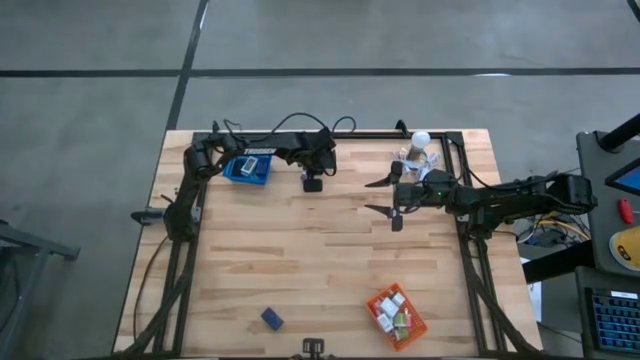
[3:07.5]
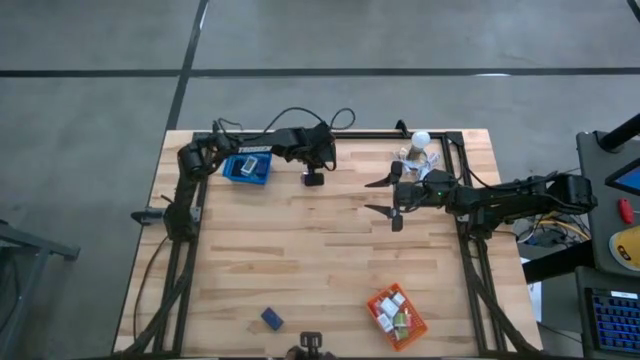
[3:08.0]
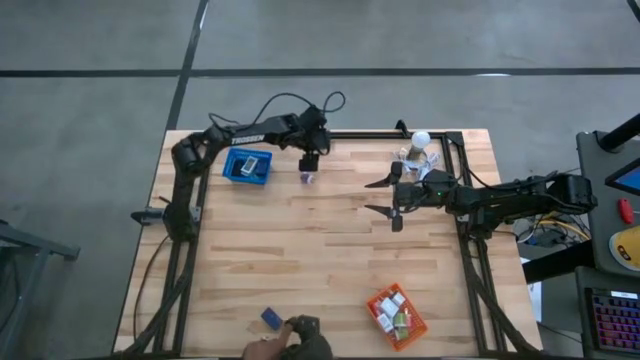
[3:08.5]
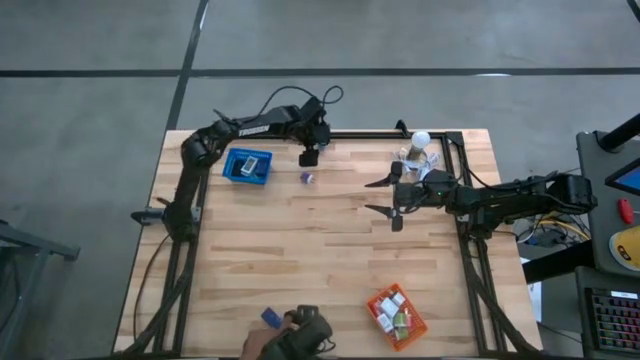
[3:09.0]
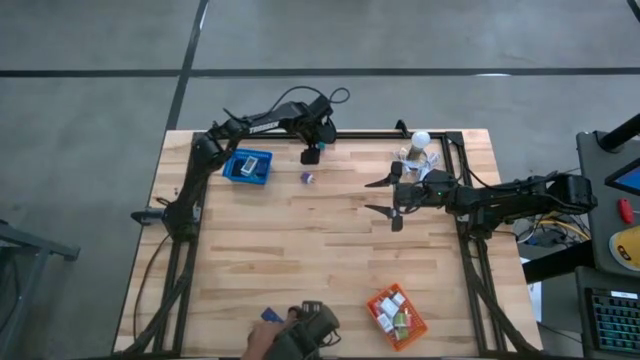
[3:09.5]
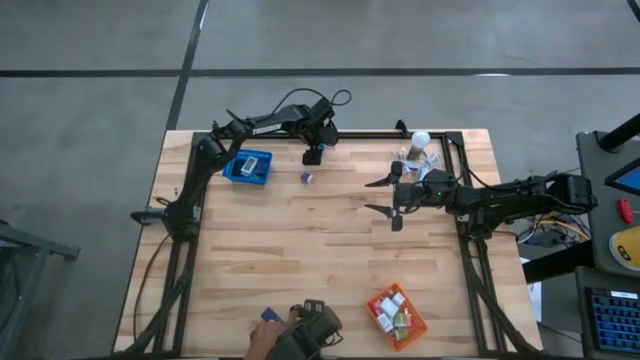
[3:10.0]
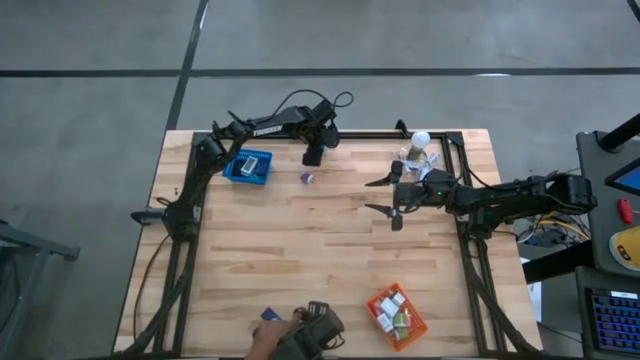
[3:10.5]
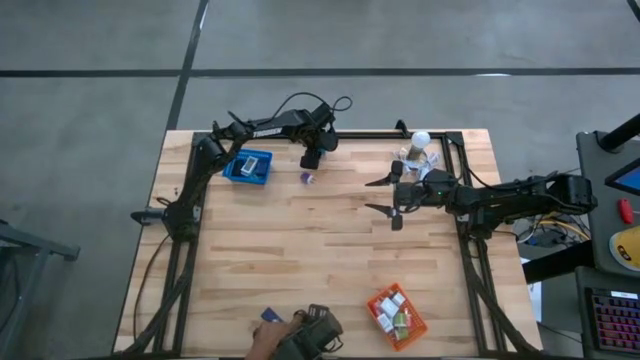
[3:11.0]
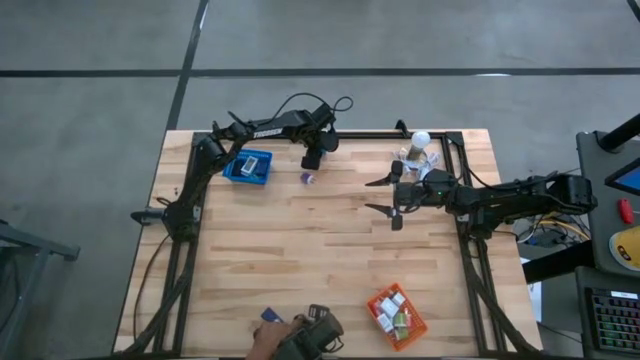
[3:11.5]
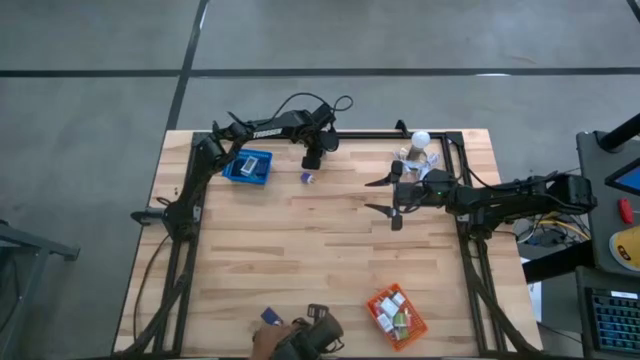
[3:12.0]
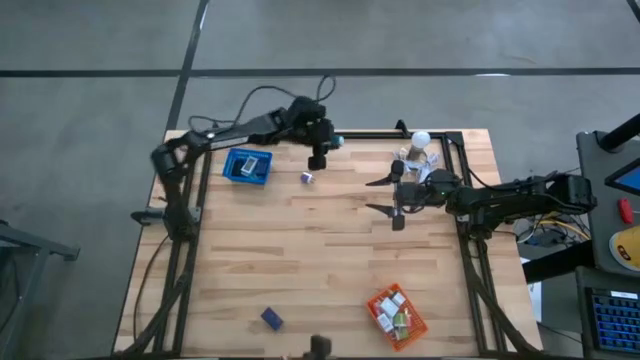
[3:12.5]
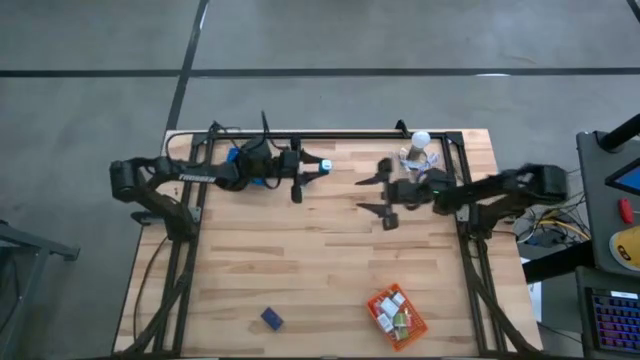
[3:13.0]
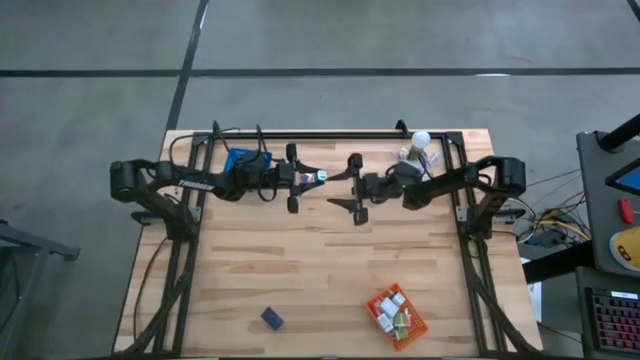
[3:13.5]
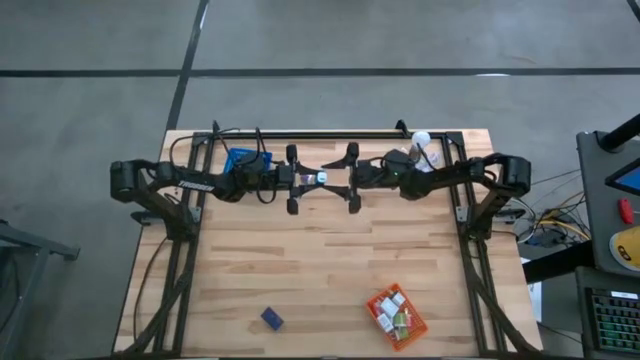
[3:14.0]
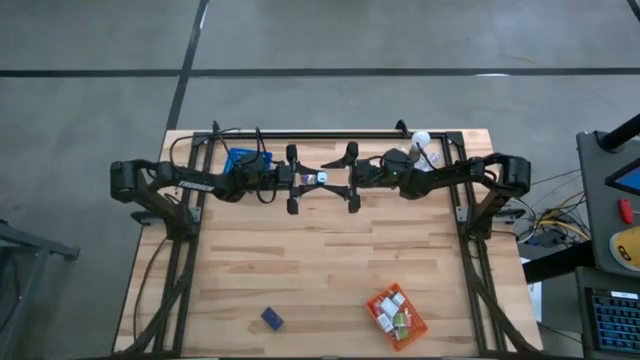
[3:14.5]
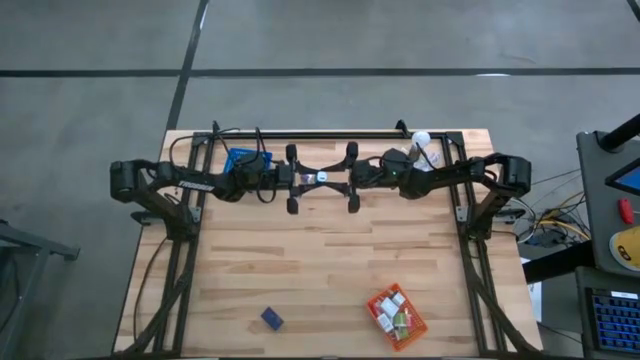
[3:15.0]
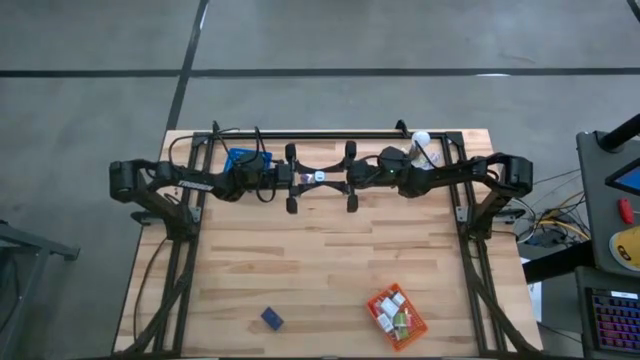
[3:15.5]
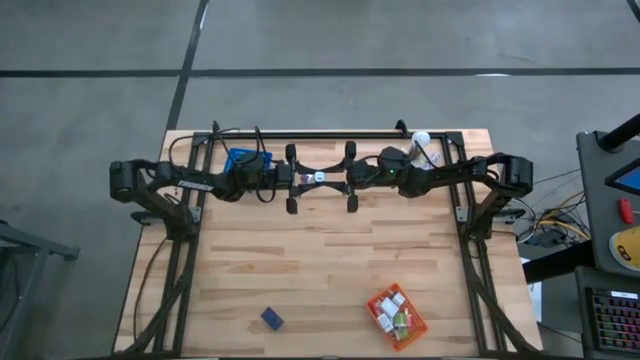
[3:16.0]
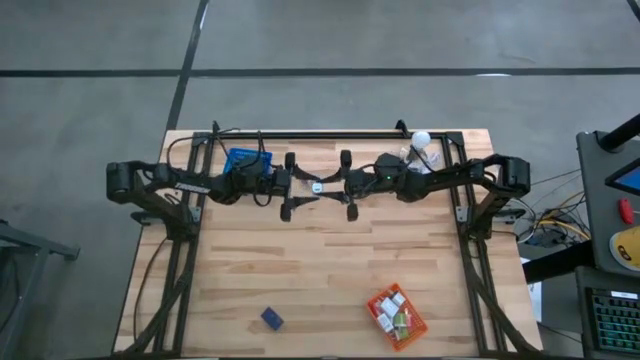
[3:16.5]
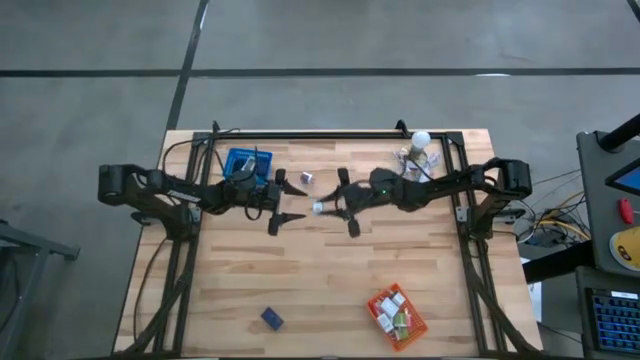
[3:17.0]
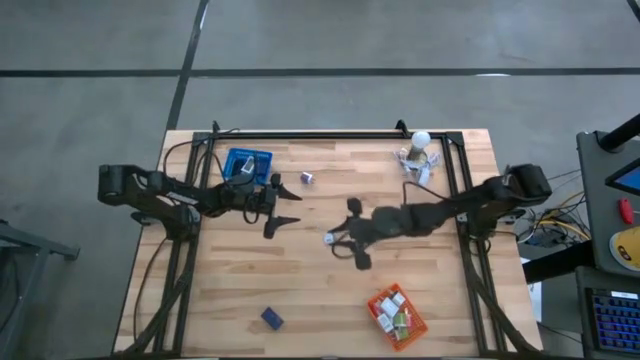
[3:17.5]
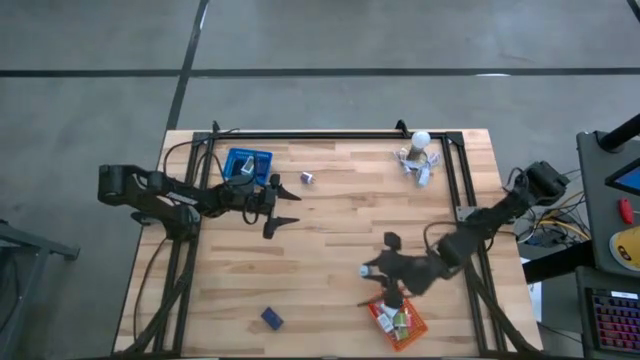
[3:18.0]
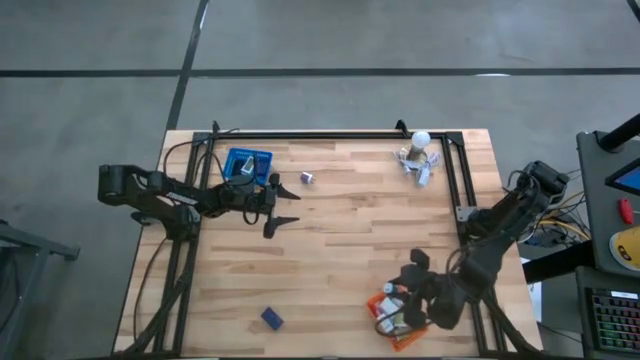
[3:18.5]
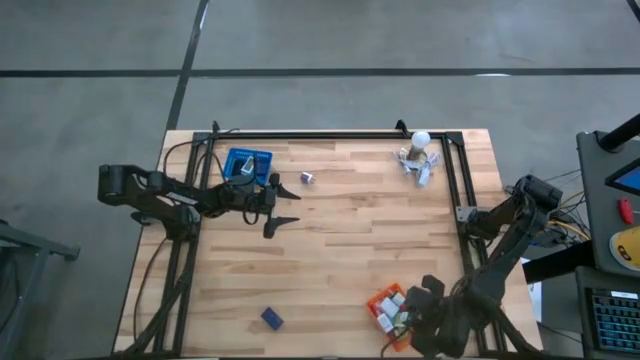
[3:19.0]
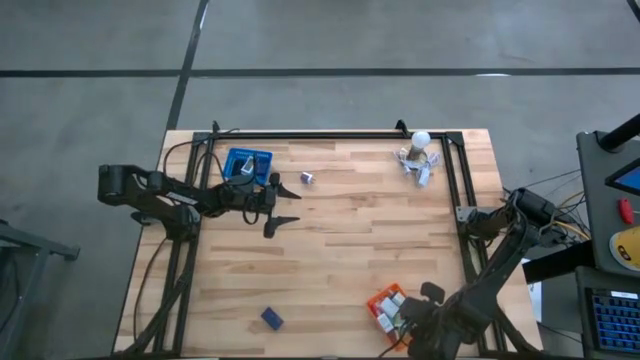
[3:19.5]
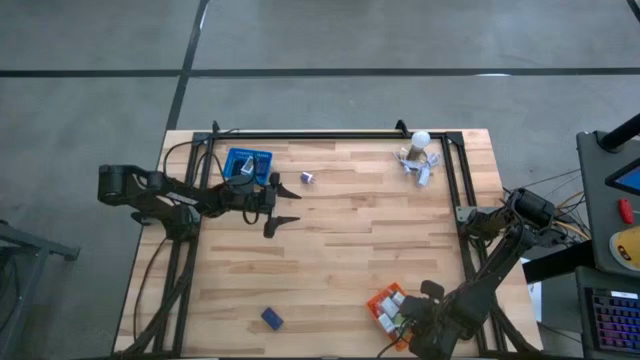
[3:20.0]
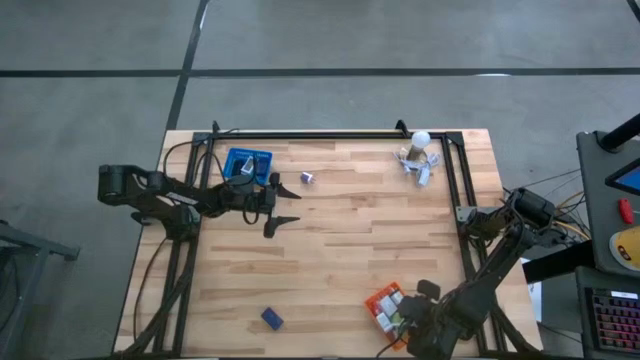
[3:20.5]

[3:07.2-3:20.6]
Task: Pick & Place Office items
Put the blue charger adapter into the orange bin

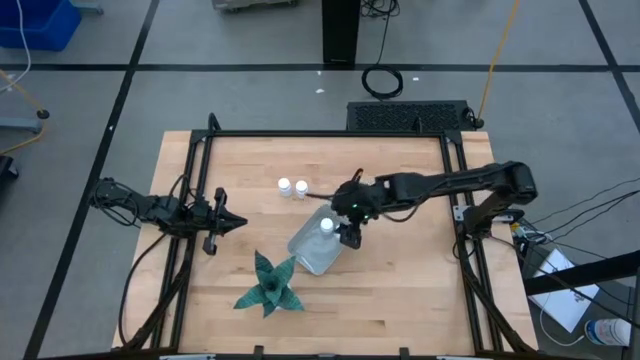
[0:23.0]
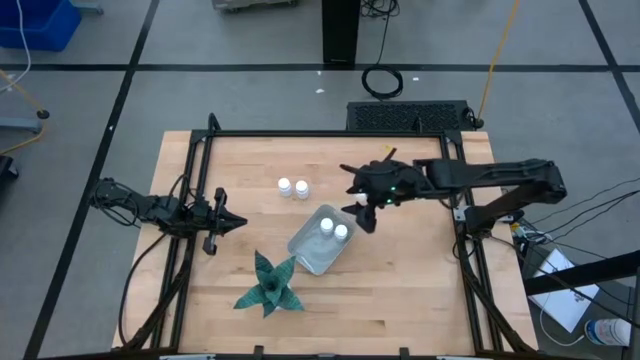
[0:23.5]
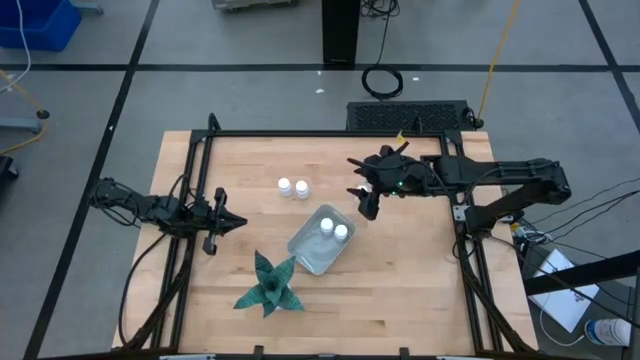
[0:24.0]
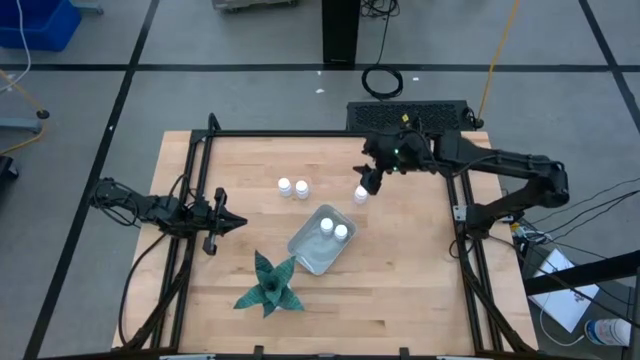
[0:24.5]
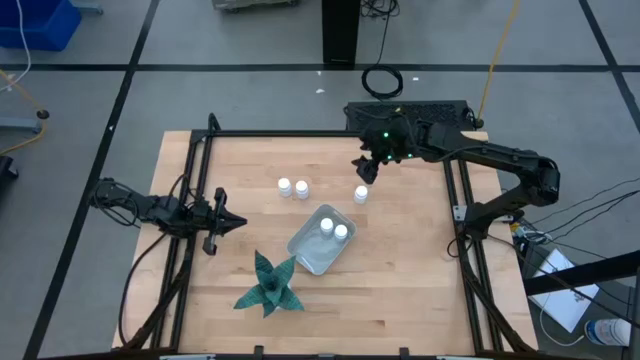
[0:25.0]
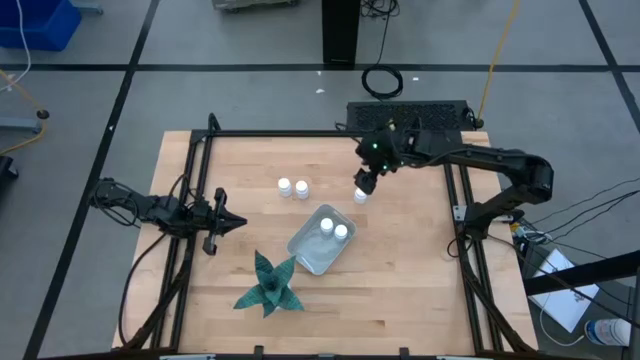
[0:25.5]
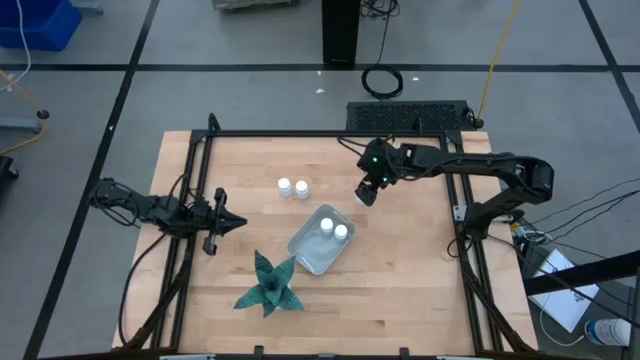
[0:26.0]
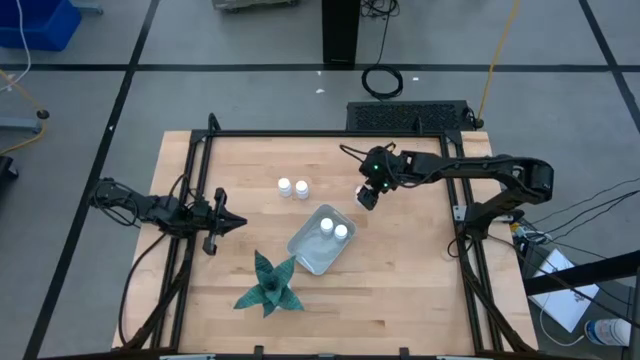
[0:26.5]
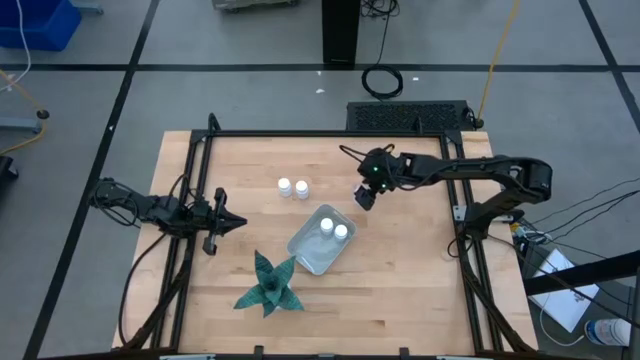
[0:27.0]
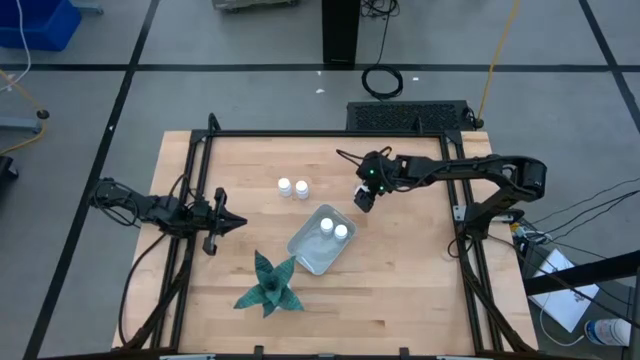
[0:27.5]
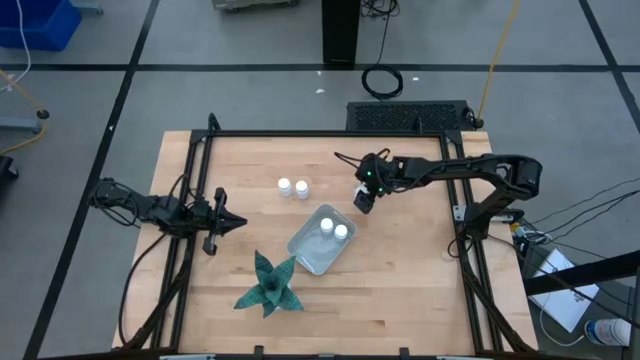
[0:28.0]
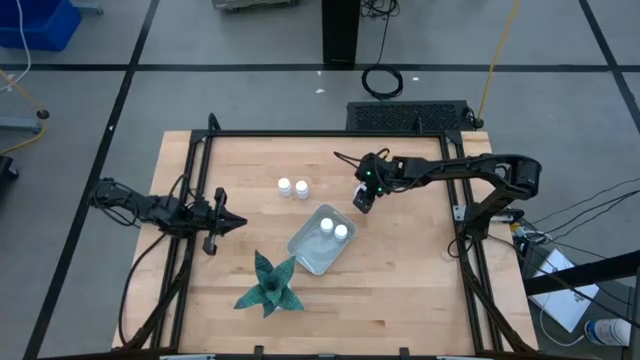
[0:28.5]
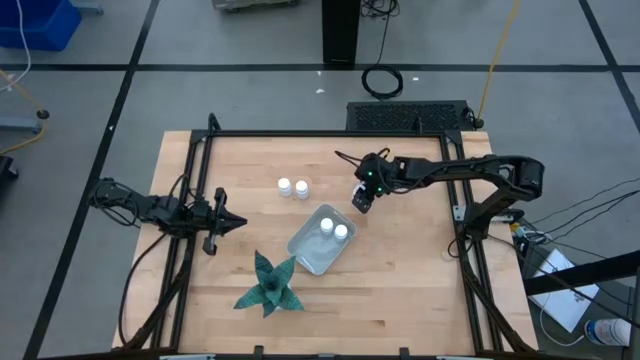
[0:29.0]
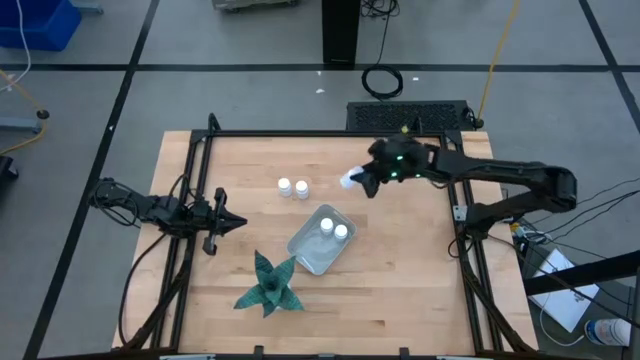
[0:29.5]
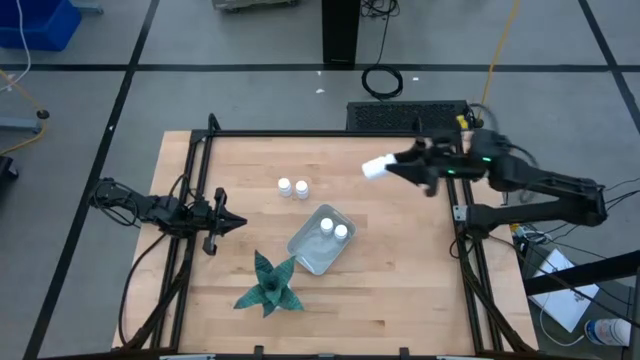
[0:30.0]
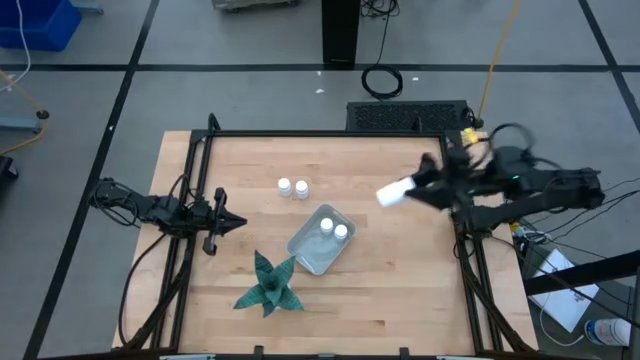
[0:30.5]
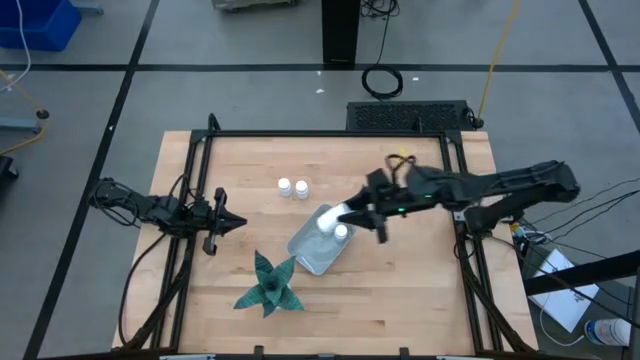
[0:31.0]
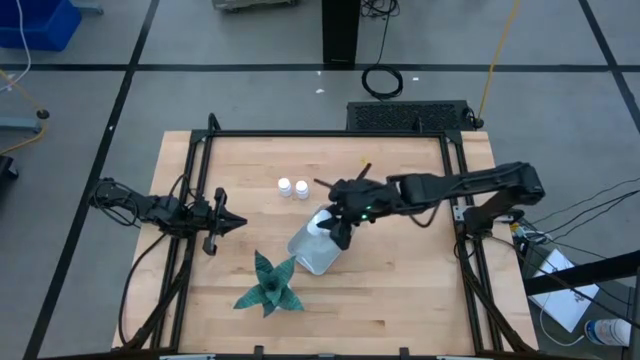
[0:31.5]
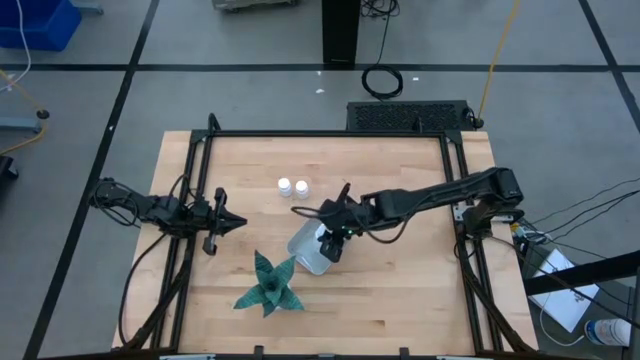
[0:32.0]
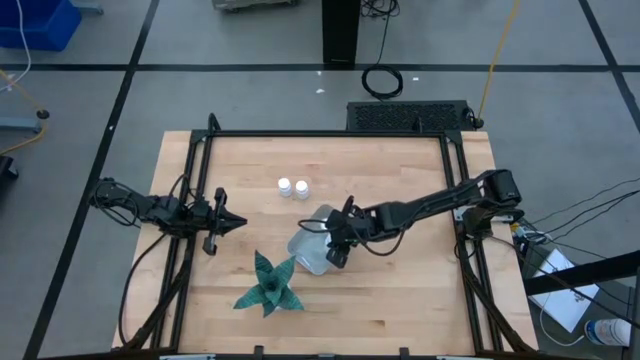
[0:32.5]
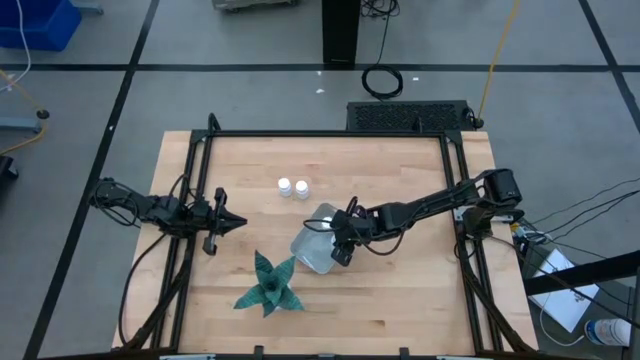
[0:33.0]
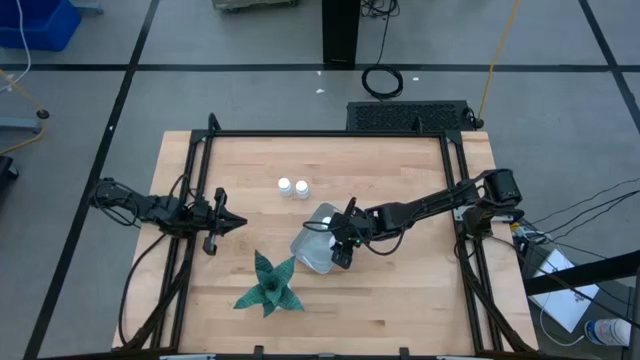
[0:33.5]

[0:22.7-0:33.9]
Task: Pick and place pill bottles into a basket
Put the white pill bottle into the gray bin
